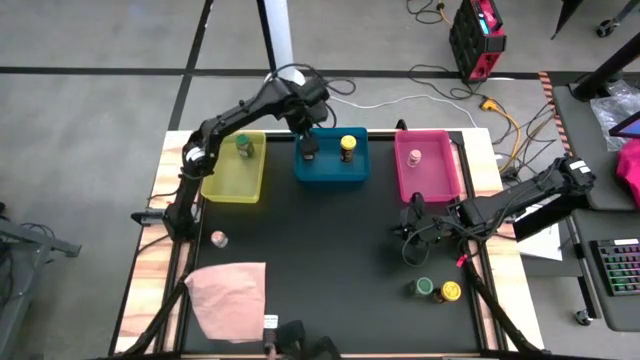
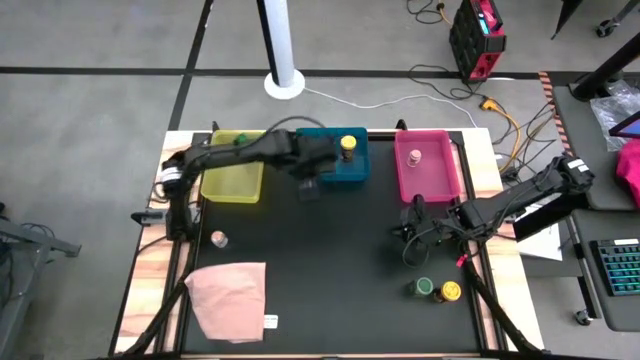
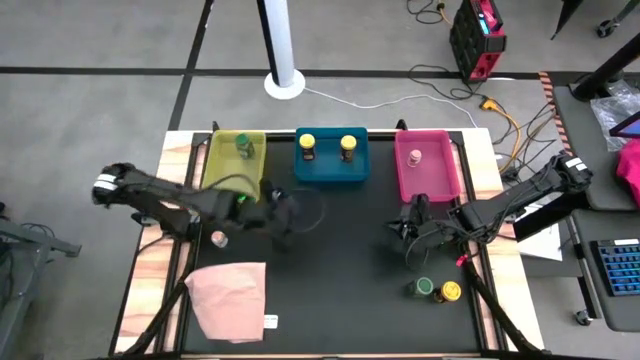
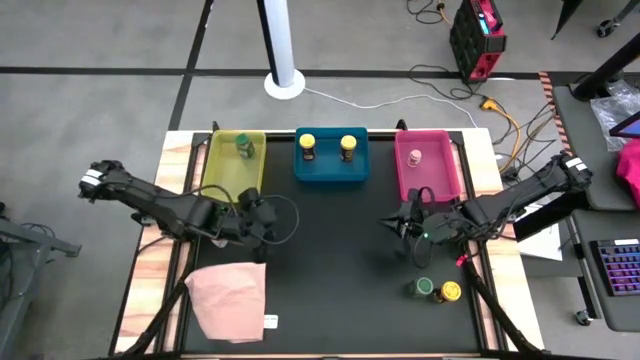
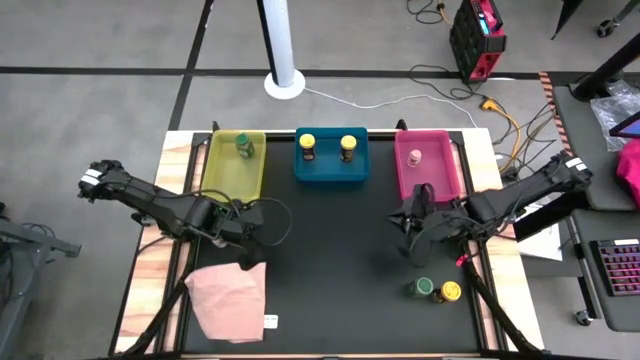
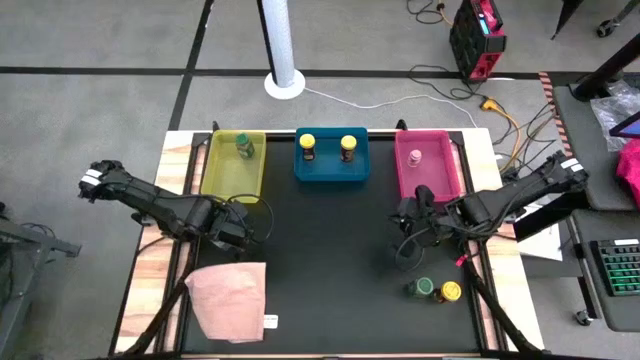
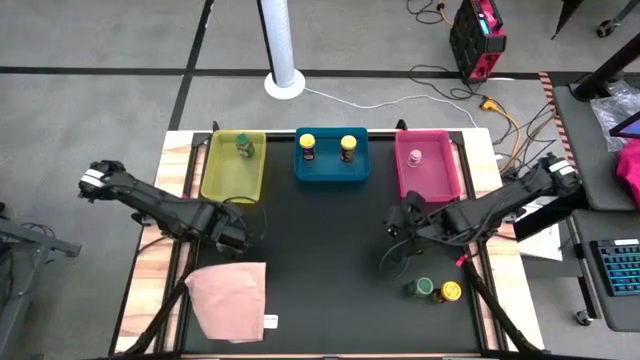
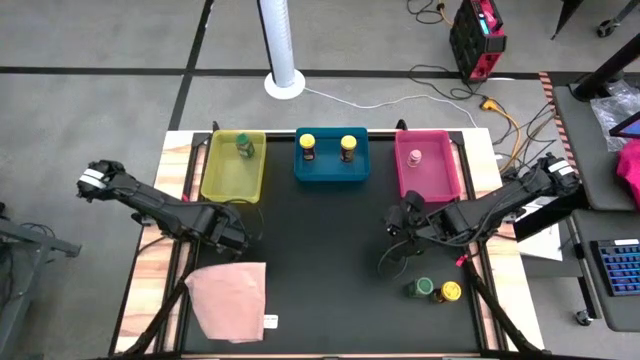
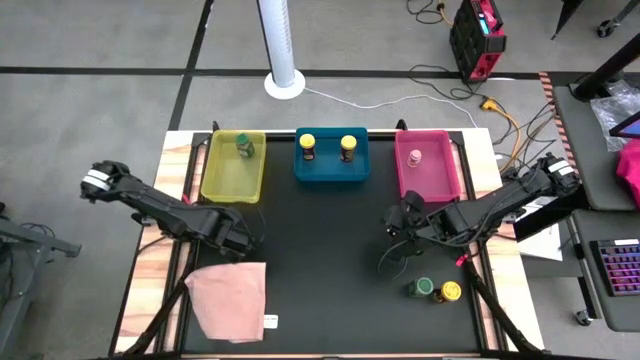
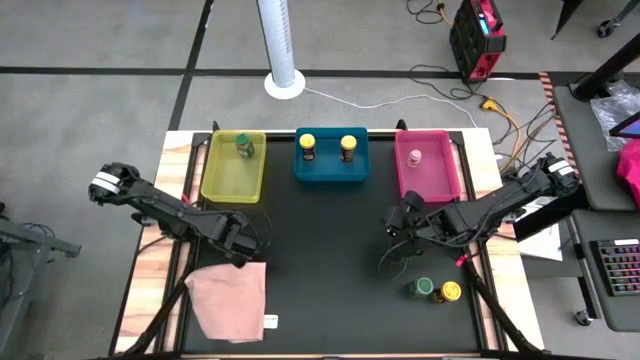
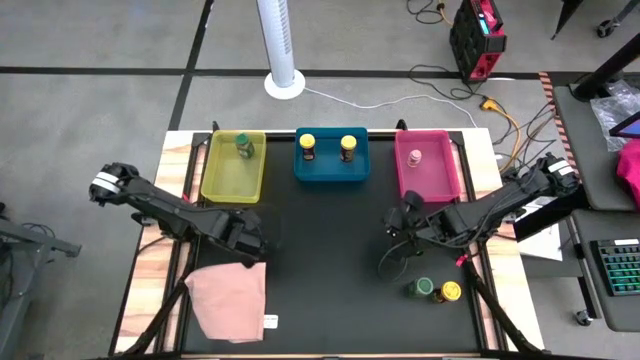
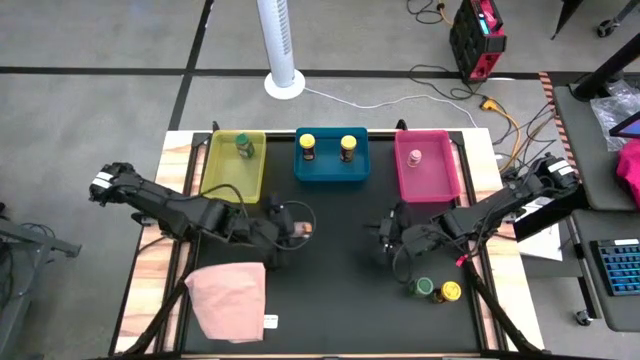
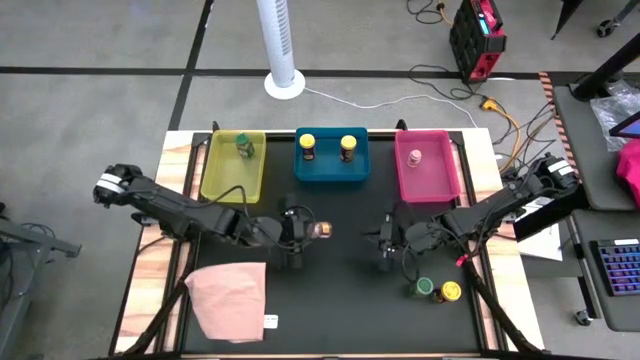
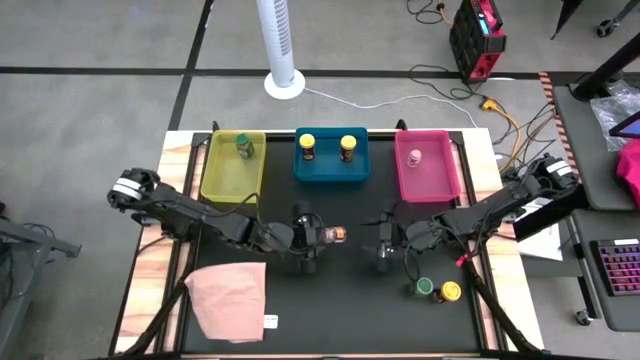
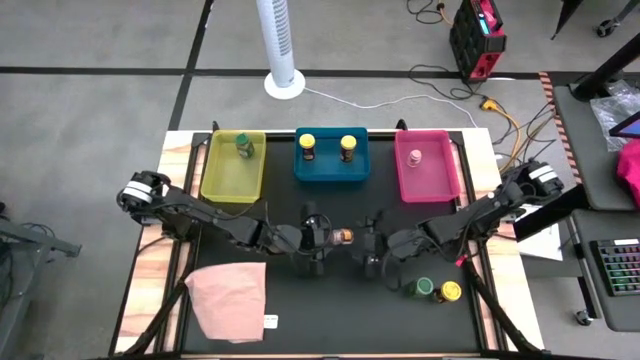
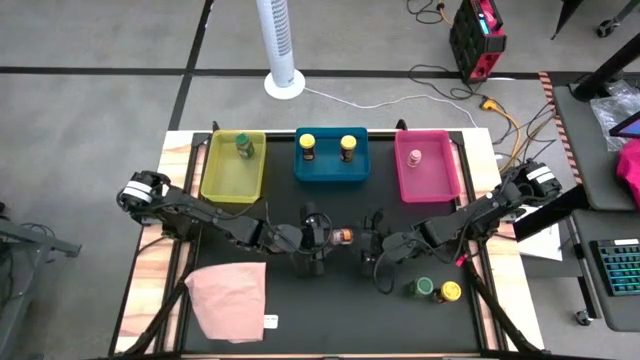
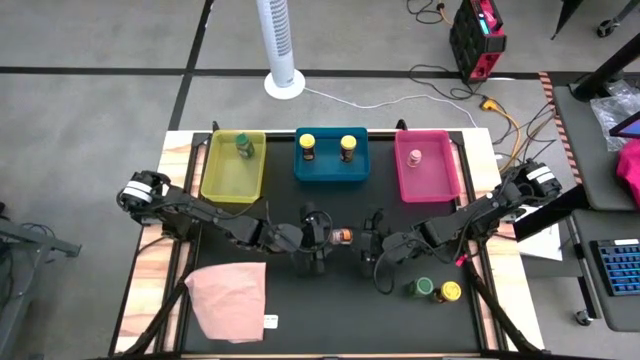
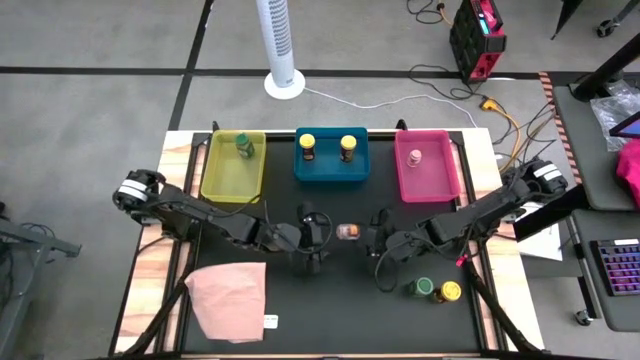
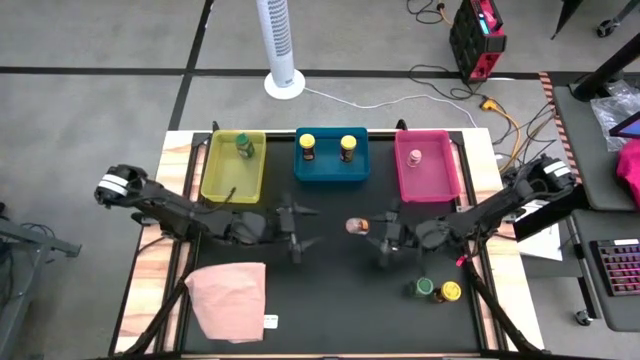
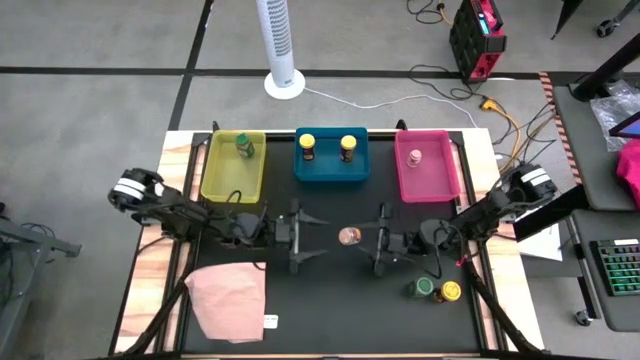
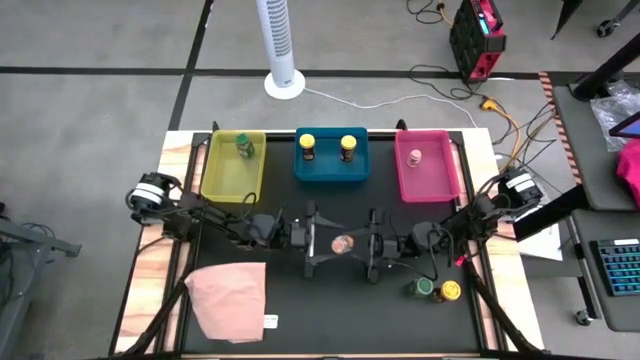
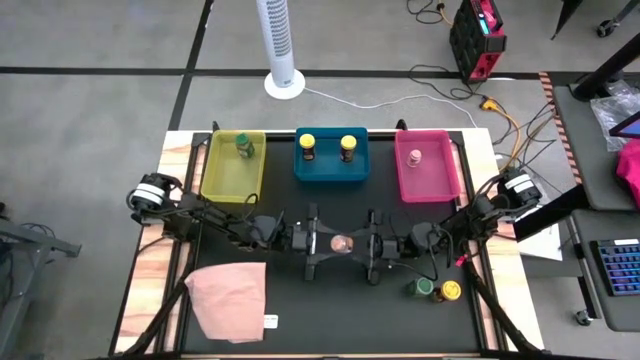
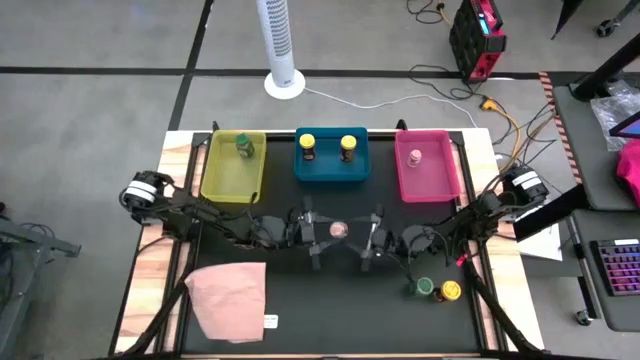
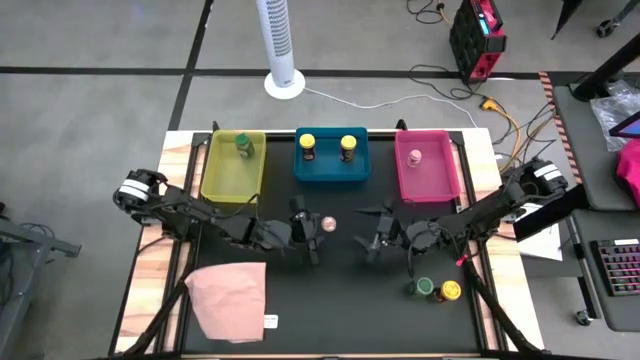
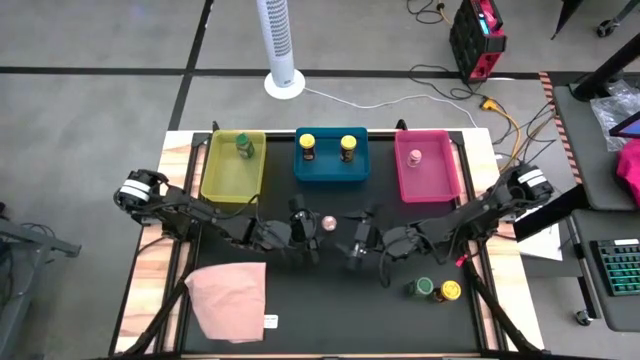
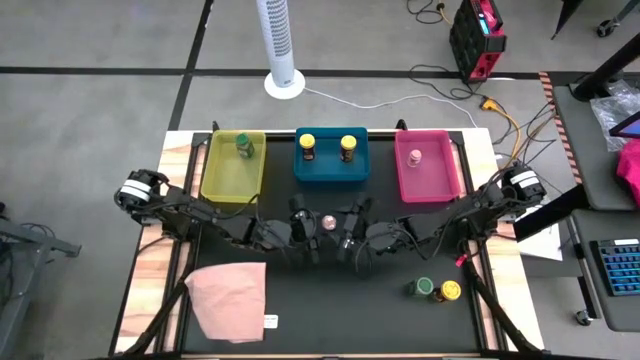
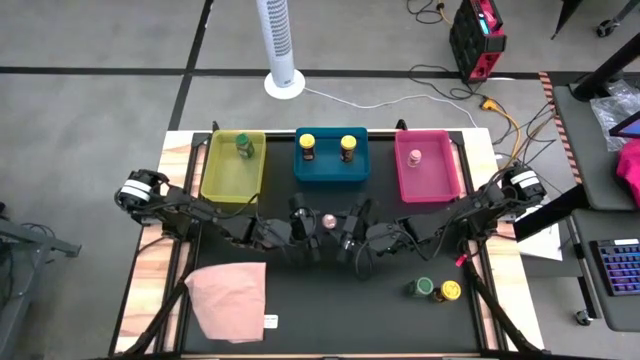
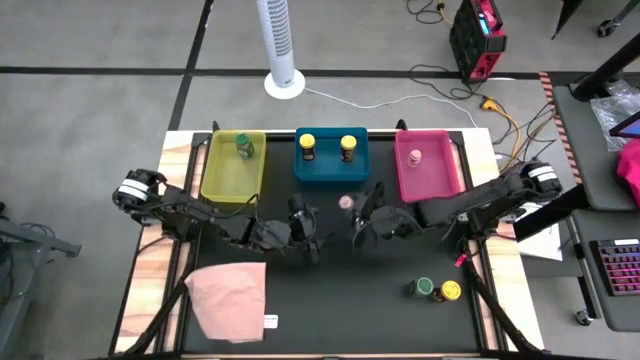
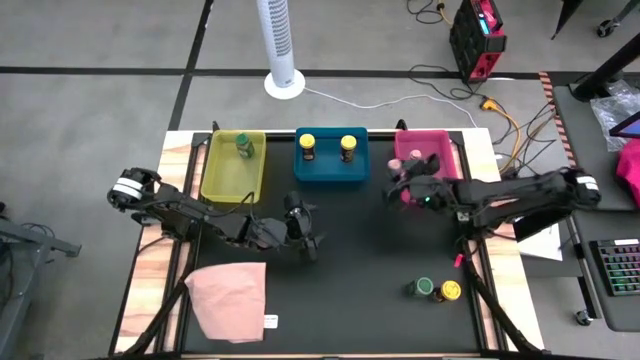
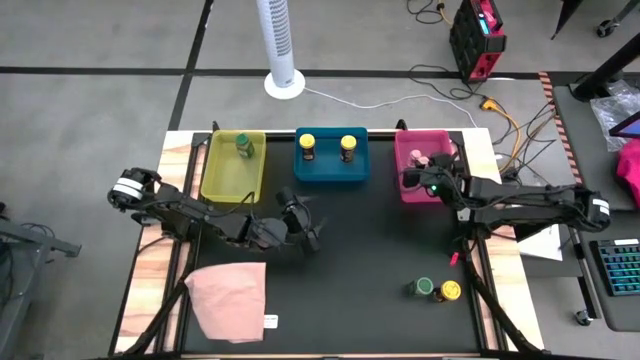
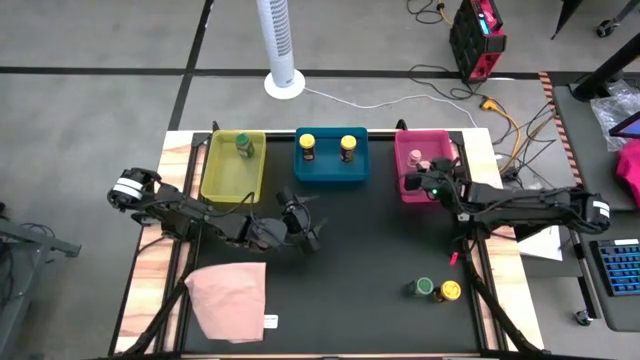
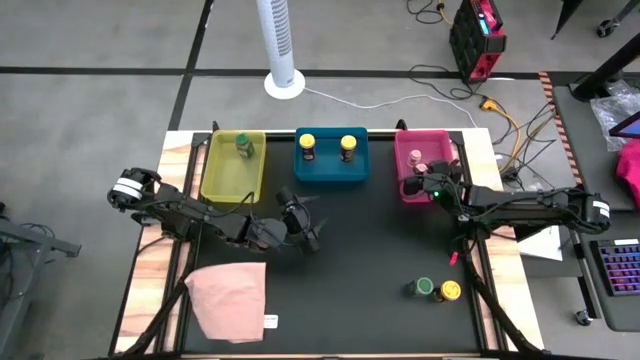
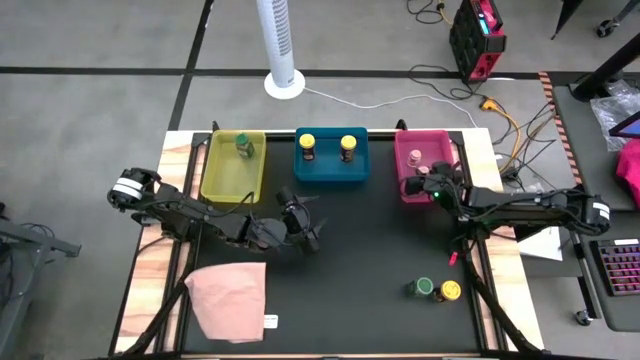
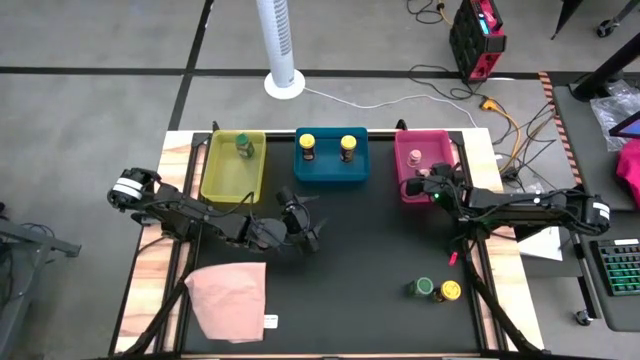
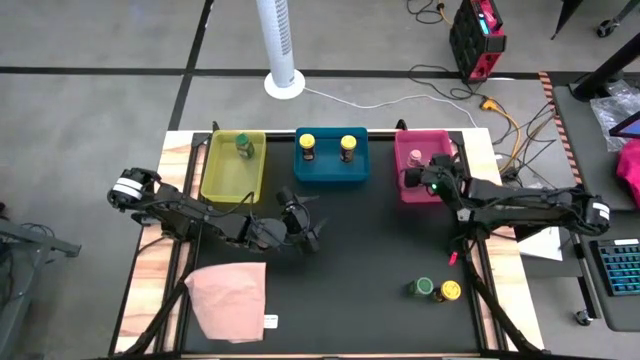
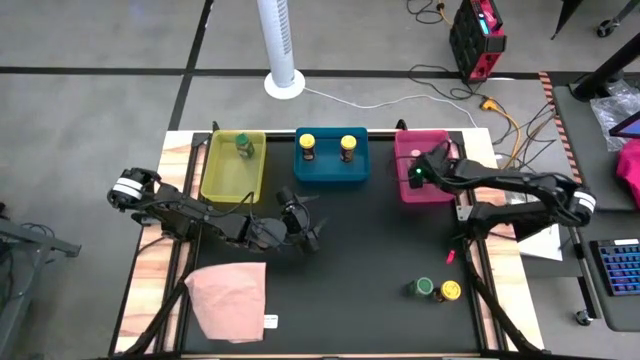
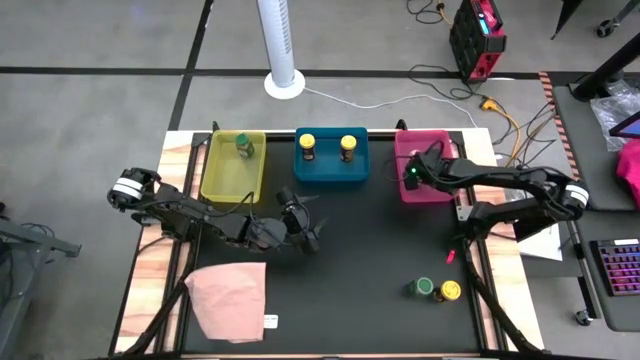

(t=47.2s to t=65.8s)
Task: Sort spices by type
Put the brown seasoning bottle into the pink bin

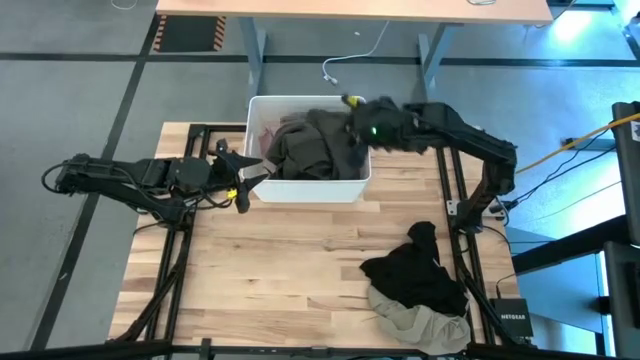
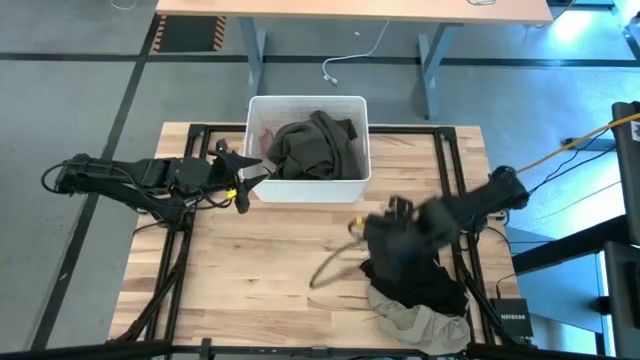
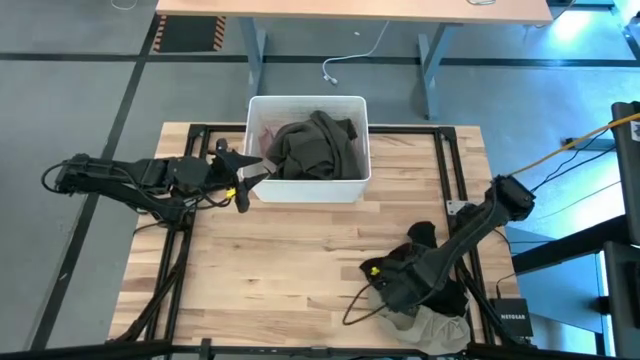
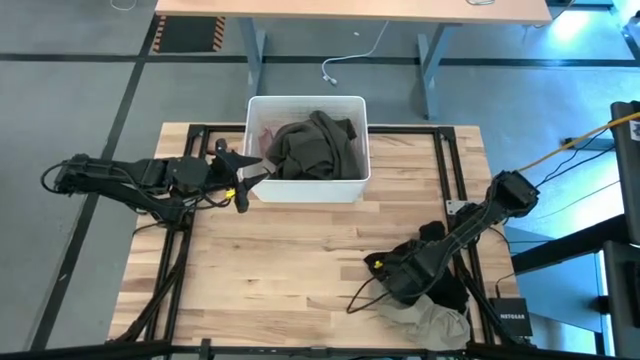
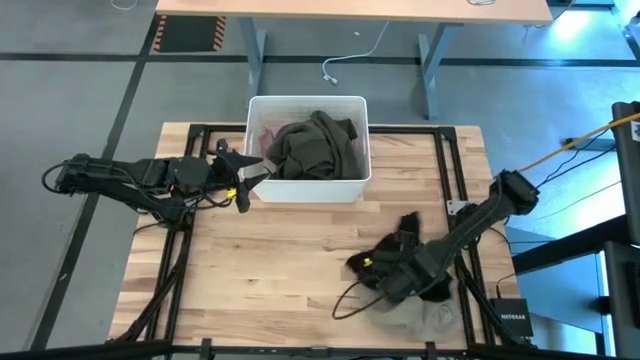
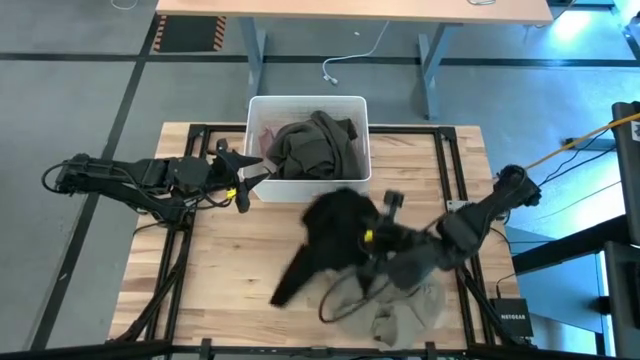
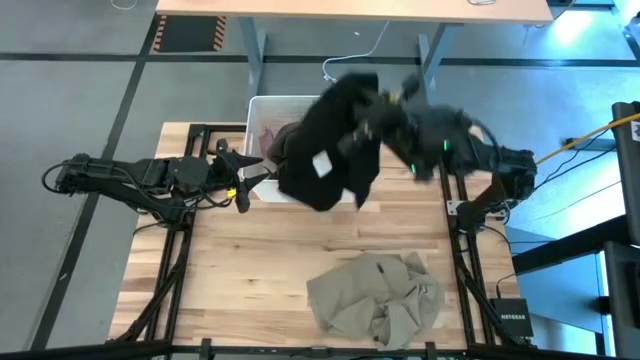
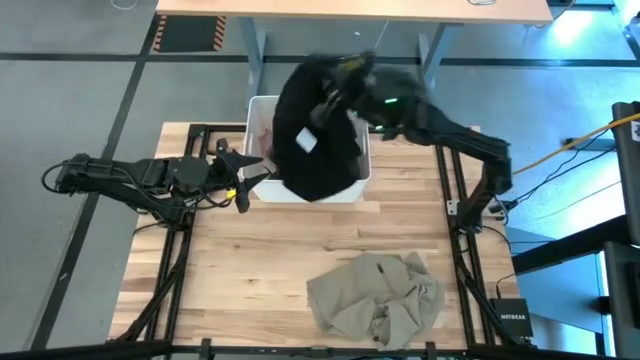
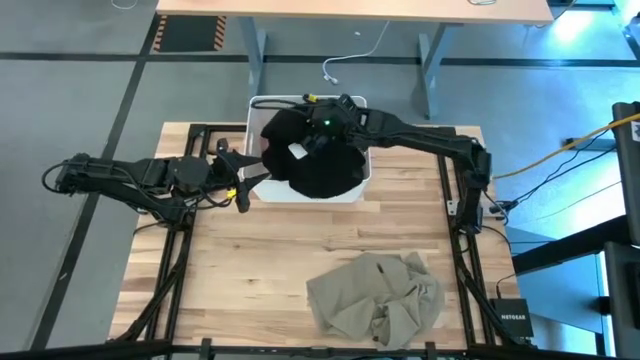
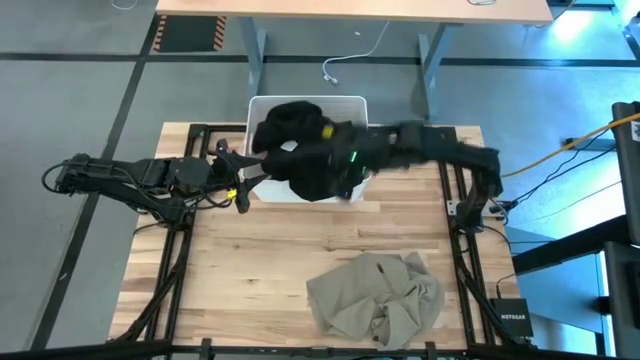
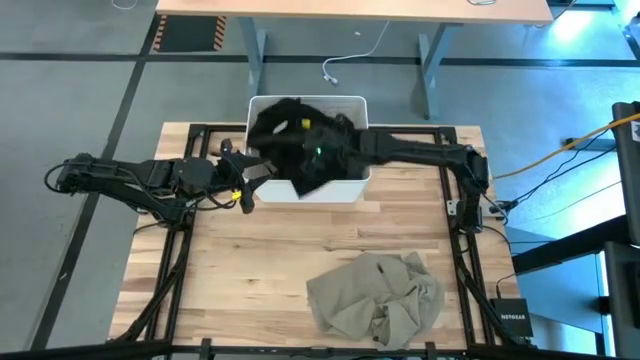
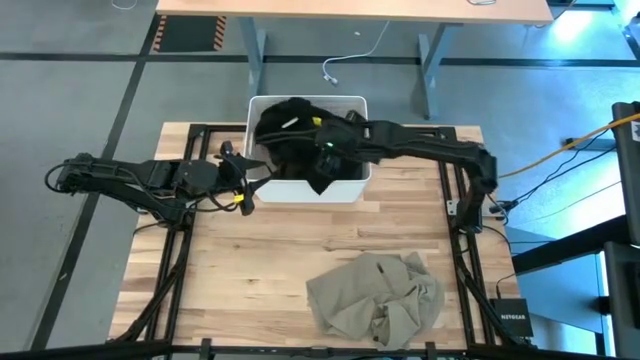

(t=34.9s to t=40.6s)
Task: Sort clothes
Put the black shirt into the white laundry bin
